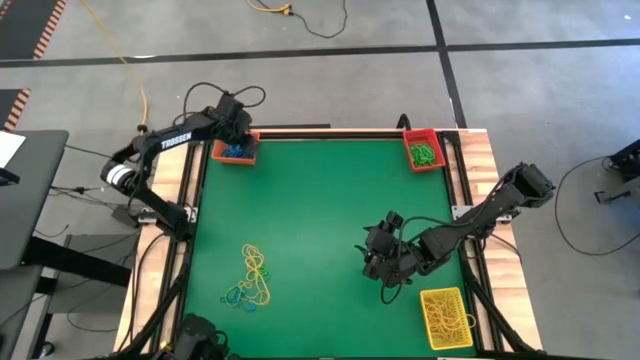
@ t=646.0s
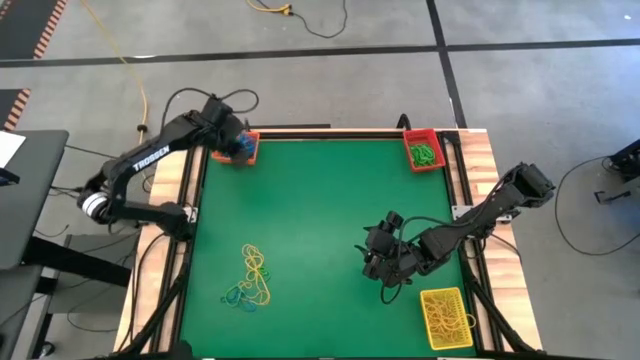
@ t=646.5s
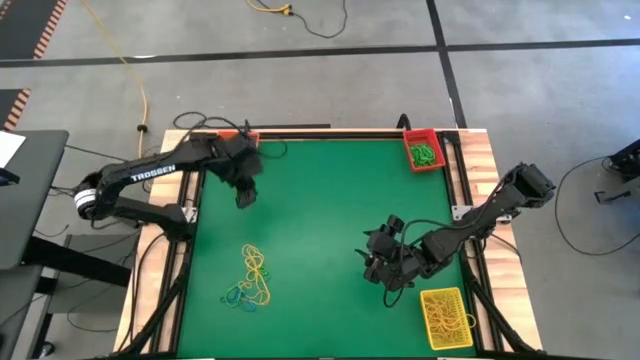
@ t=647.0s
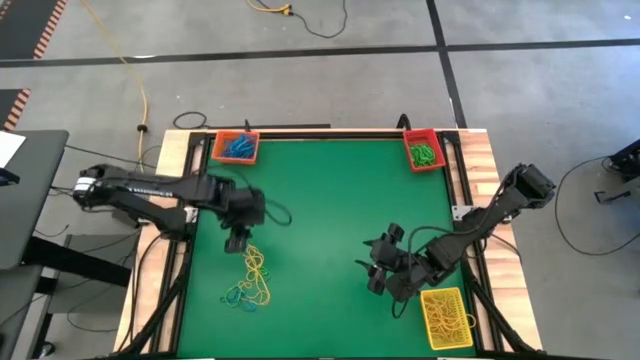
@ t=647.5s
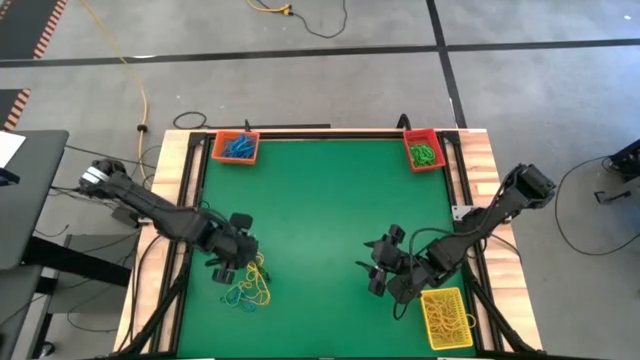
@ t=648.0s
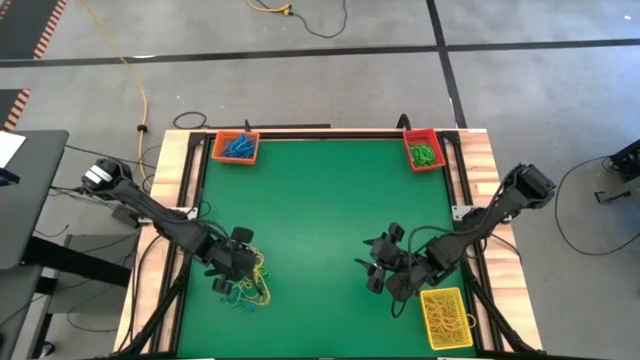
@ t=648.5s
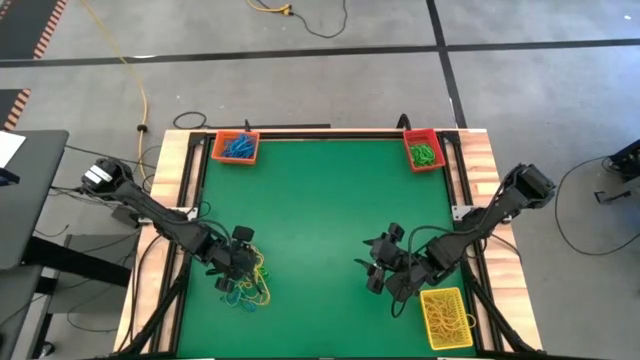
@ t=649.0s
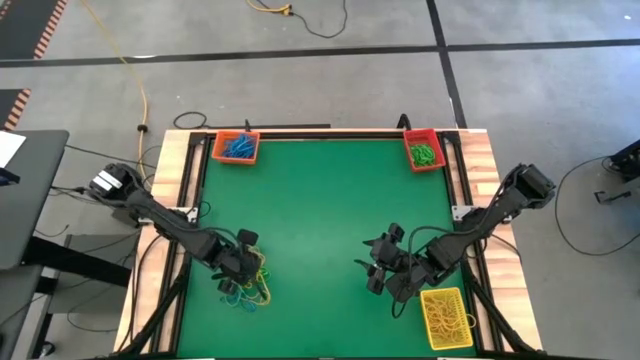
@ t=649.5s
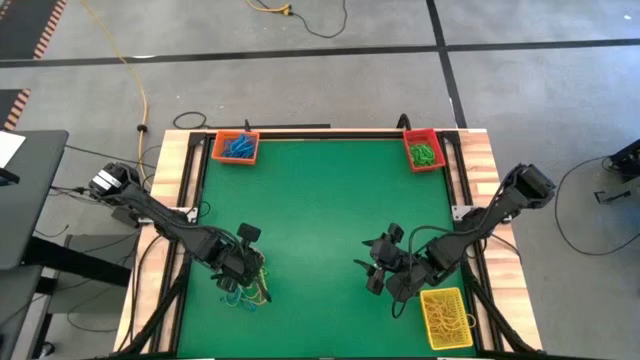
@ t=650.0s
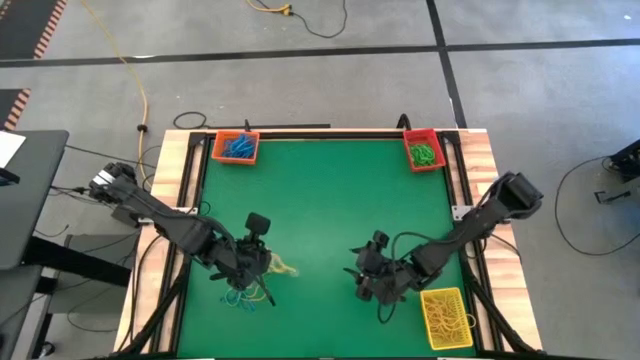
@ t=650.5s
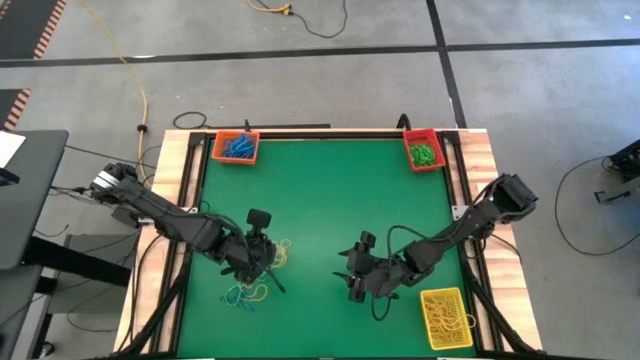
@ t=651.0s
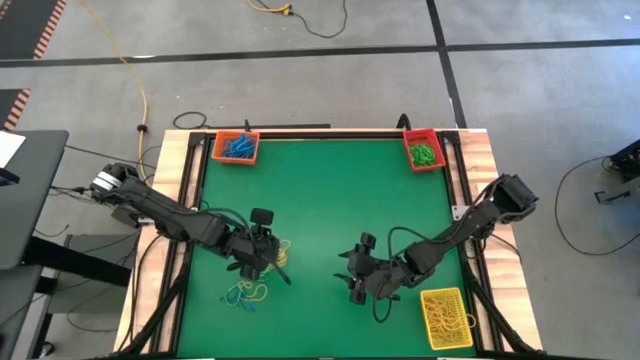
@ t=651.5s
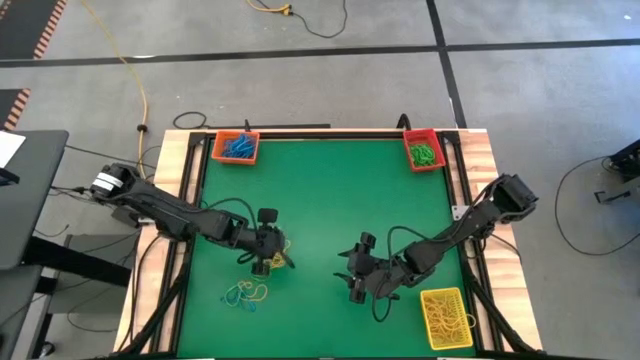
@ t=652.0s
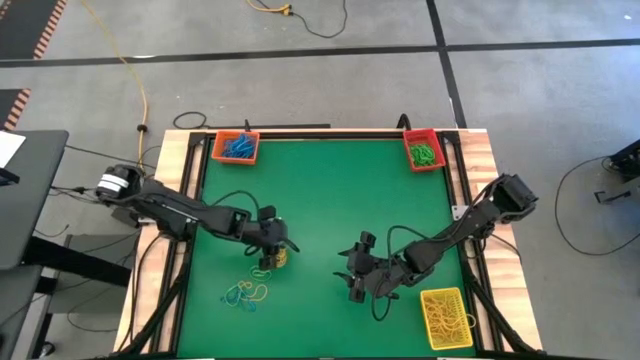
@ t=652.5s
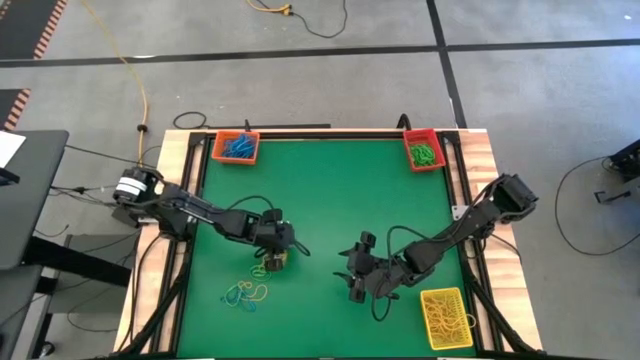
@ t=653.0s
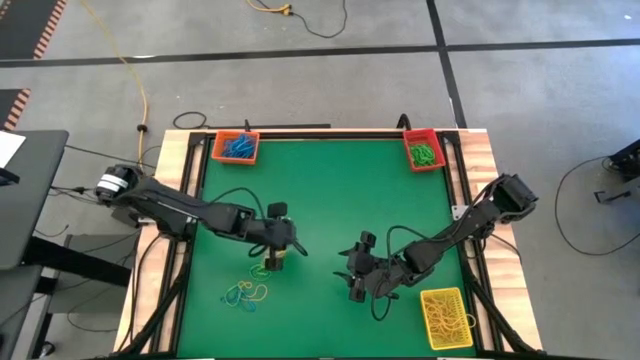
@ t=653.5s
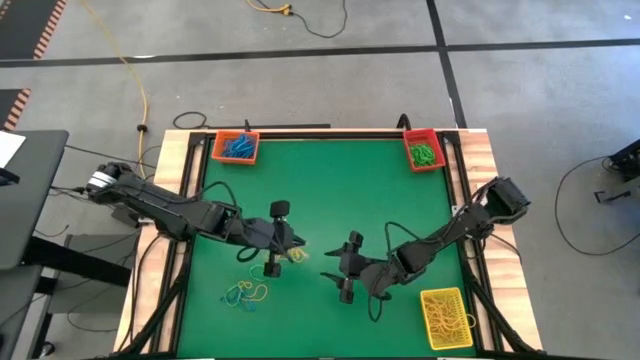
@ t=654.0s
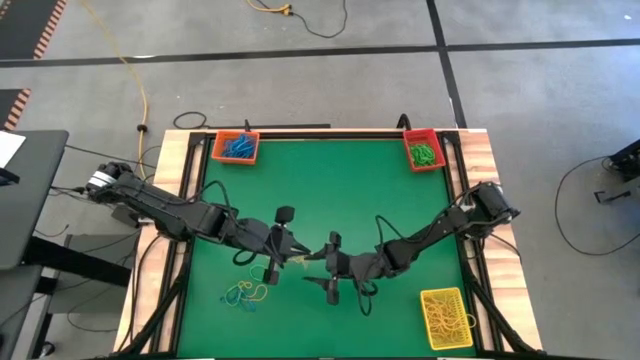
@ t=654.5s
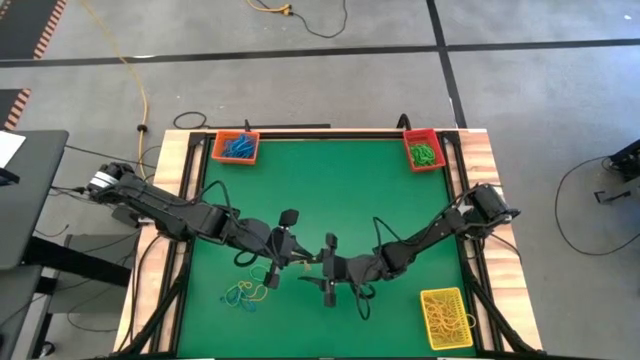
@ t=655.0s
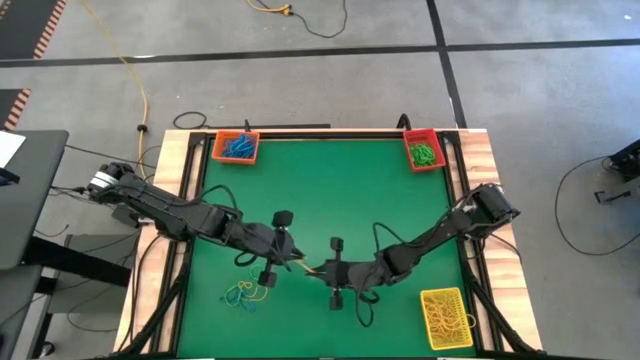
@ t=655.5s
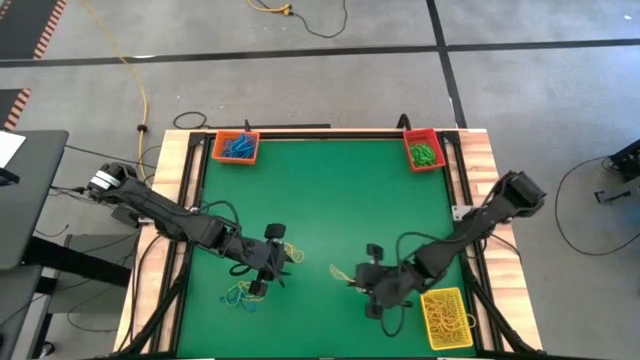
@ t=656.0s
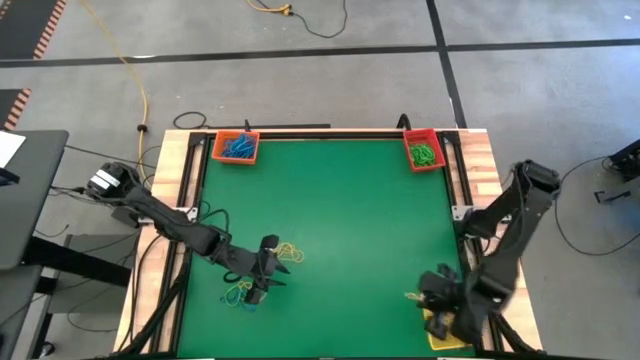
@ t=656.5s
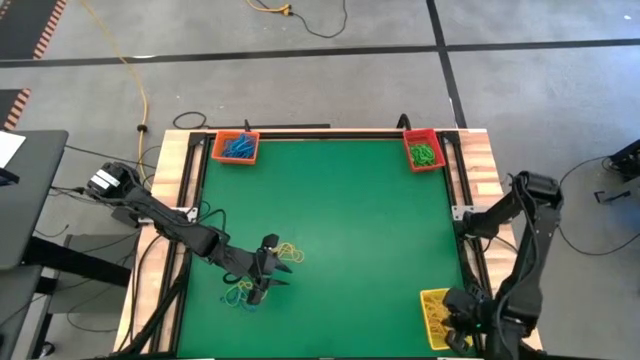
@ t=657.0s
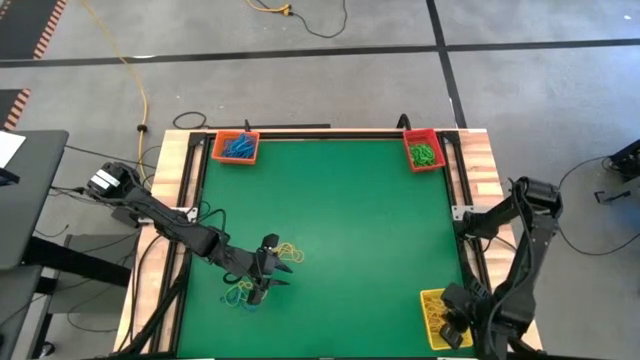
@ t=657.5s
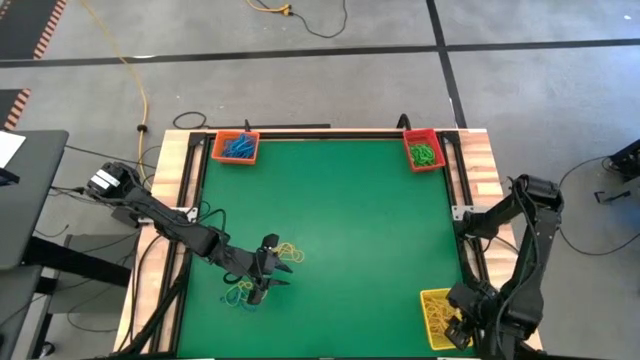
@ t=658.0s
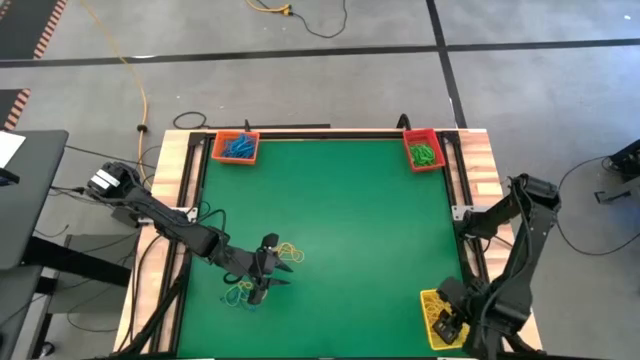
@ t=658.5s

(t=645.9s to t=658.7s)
Task: Sort rubber bands into baskets
Put the left yellow rubber band into the yellow bin

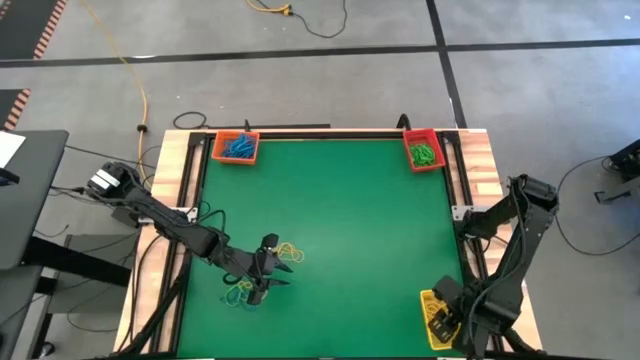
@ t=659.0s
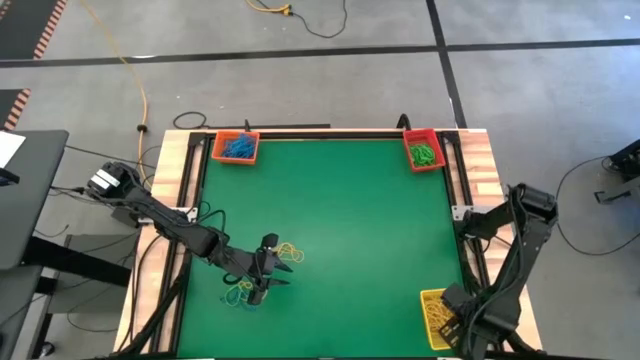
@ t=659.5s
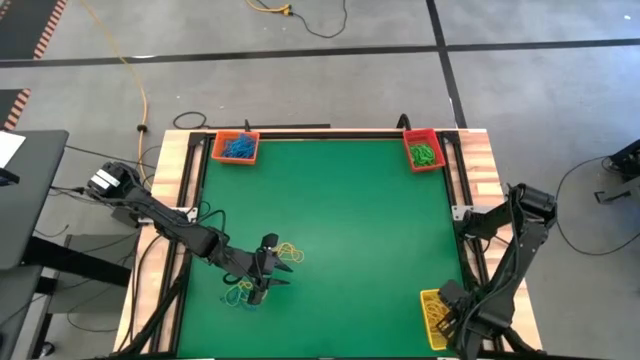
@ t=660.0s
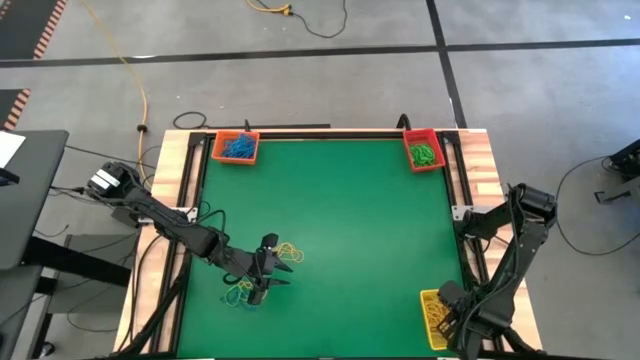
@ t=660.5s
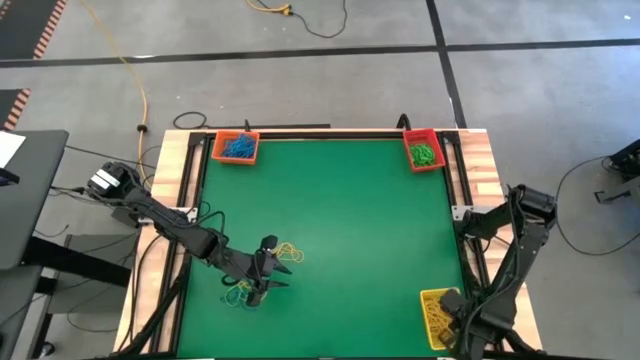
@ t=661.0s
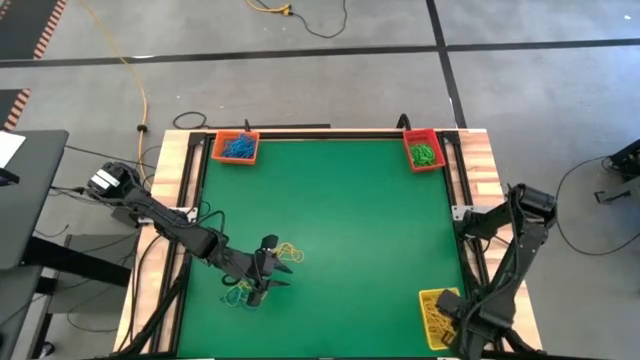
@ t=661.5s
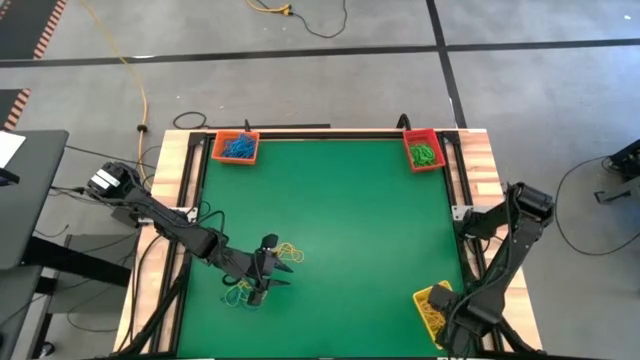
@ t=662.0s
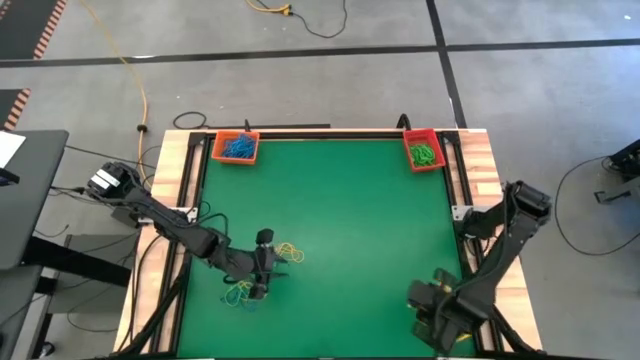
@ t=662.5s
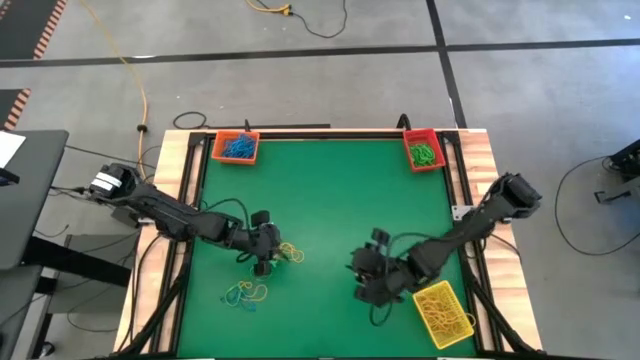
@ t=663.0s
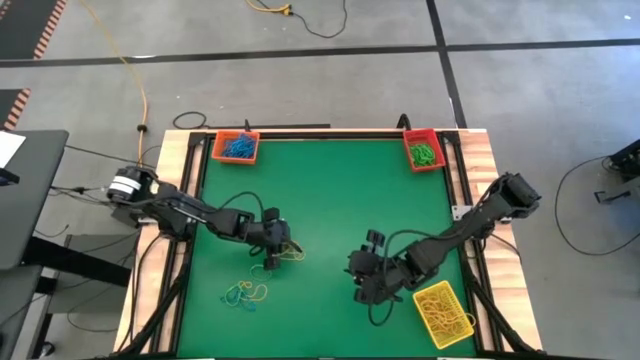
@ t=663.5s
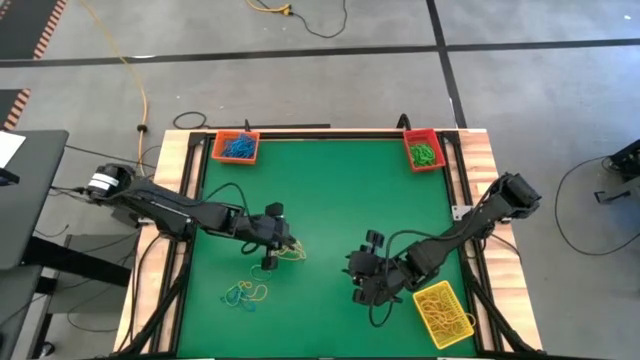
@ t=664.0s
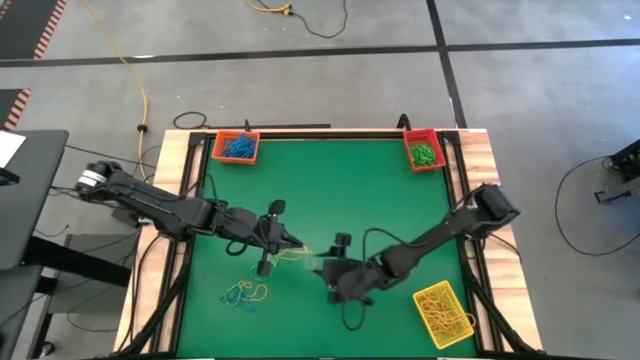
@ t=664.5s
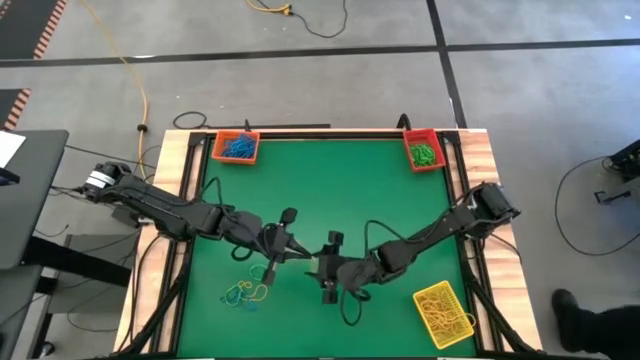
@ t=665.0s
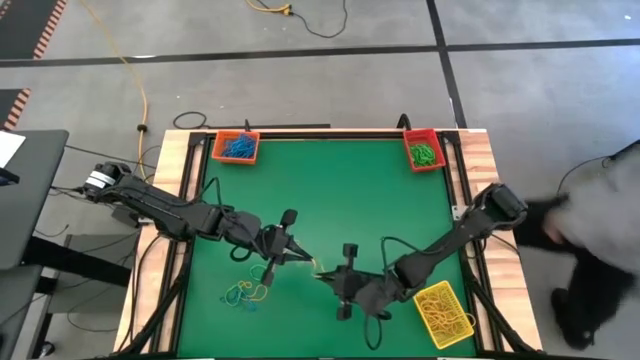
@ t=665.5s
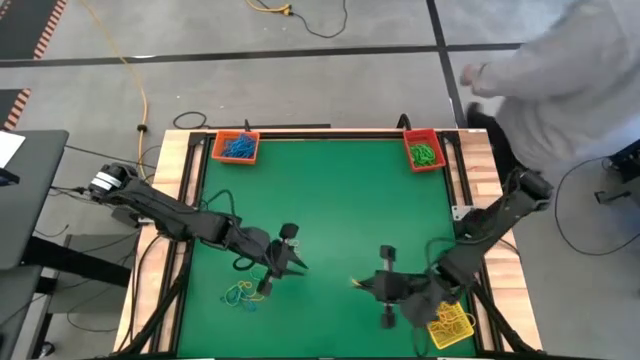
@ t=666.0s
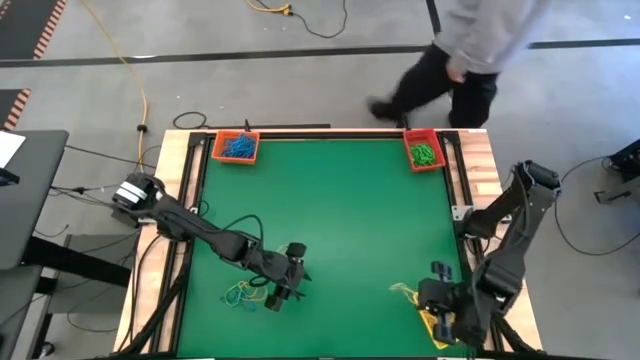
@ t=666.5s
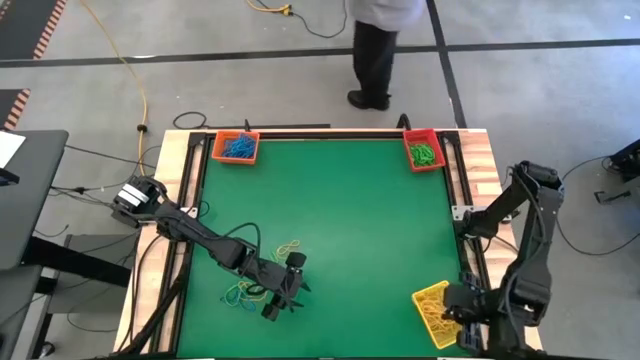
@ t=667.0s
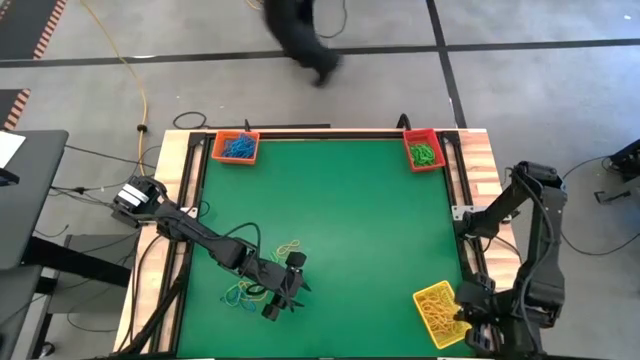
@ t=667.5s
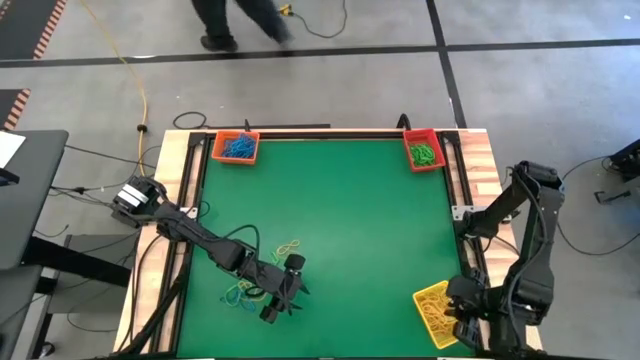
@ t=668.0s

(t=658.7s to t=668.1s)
Put the left yellow rubber band into the yellow bin
